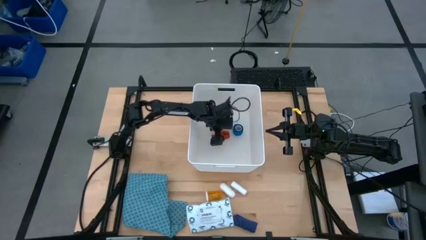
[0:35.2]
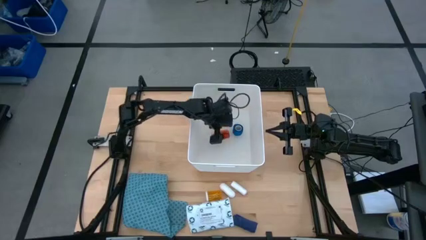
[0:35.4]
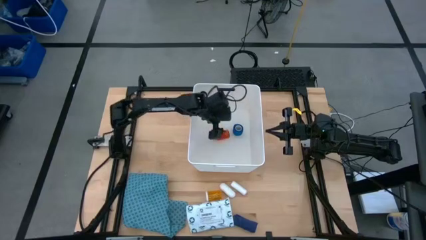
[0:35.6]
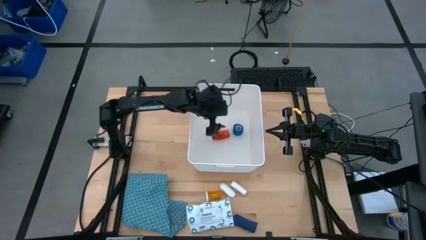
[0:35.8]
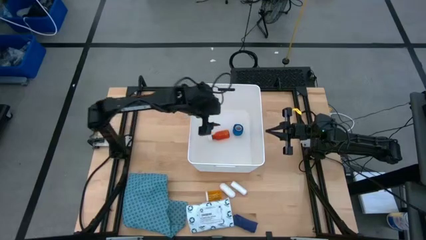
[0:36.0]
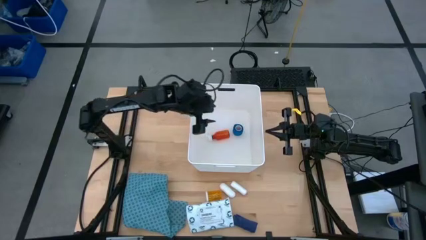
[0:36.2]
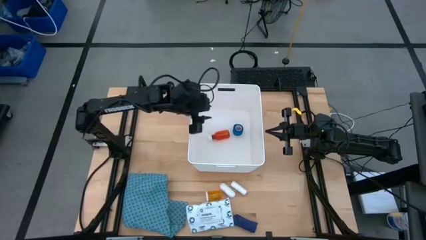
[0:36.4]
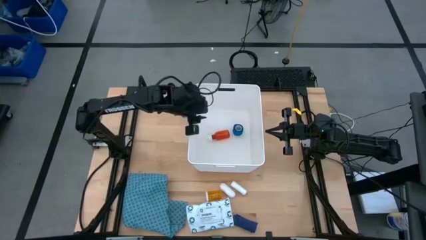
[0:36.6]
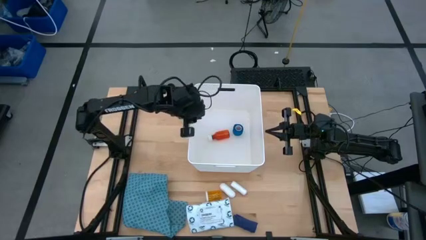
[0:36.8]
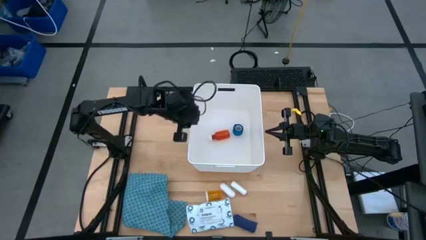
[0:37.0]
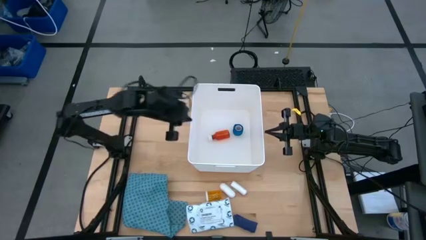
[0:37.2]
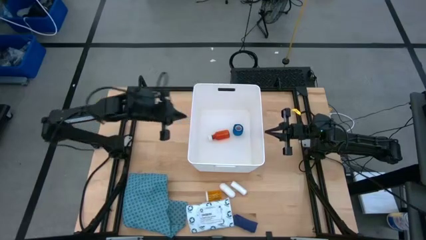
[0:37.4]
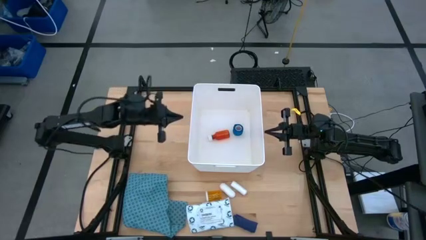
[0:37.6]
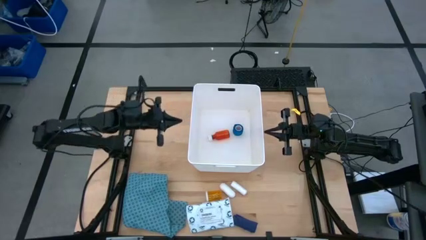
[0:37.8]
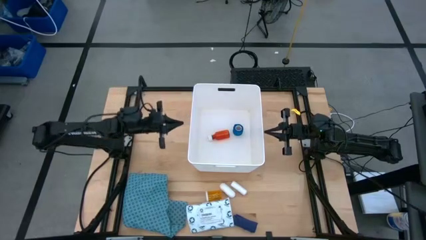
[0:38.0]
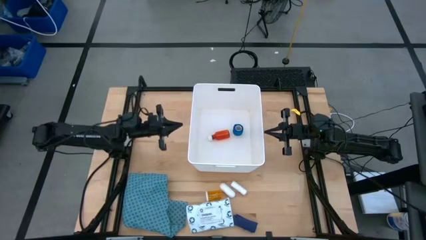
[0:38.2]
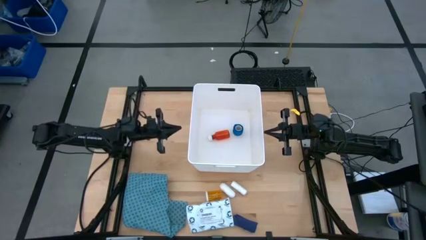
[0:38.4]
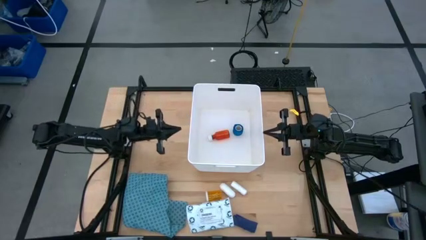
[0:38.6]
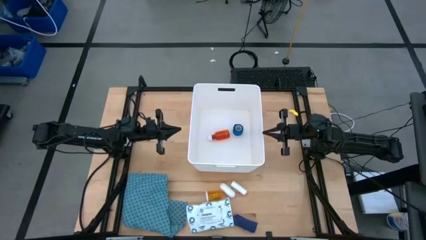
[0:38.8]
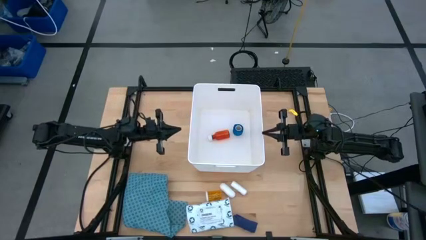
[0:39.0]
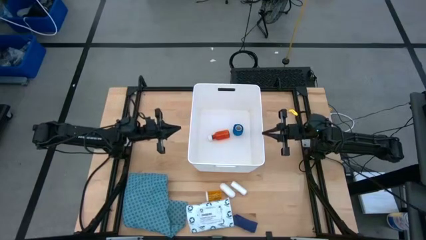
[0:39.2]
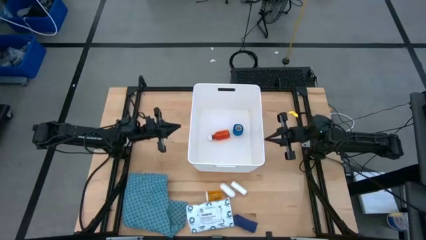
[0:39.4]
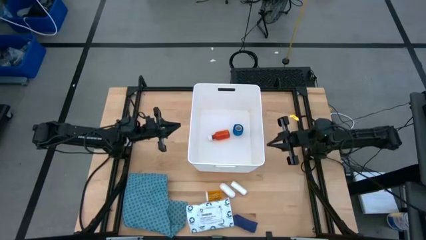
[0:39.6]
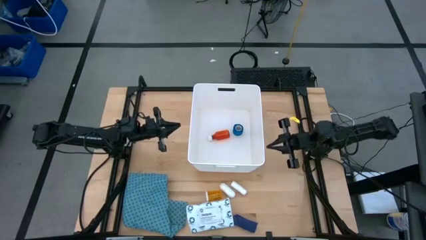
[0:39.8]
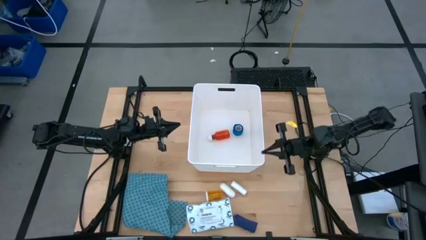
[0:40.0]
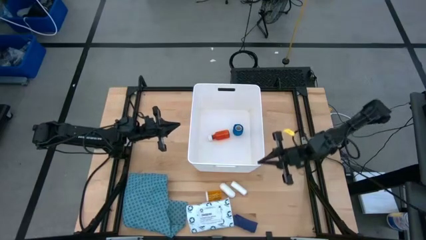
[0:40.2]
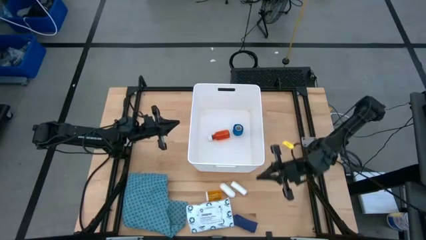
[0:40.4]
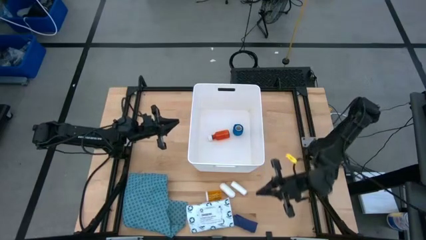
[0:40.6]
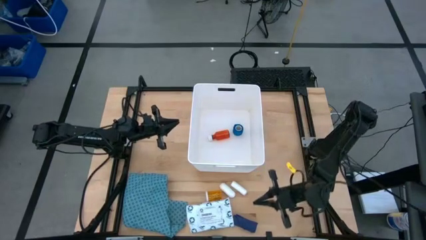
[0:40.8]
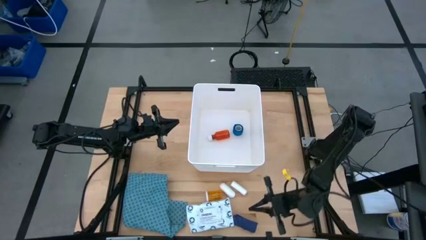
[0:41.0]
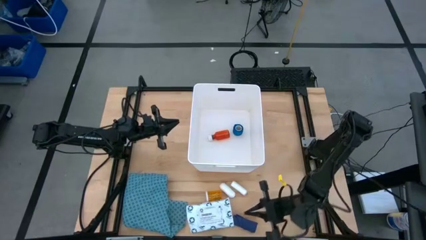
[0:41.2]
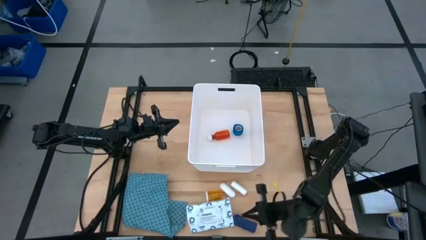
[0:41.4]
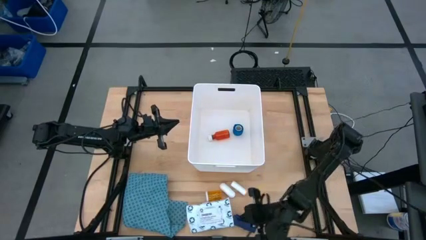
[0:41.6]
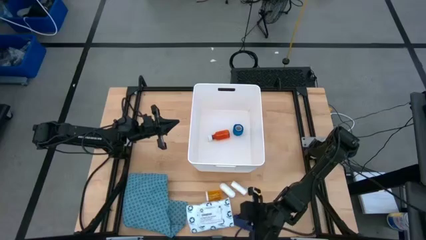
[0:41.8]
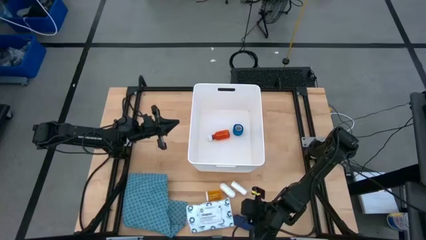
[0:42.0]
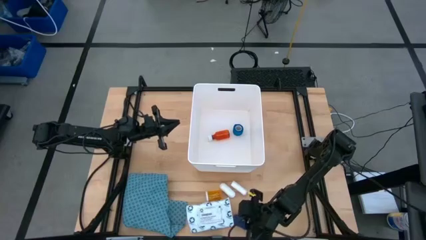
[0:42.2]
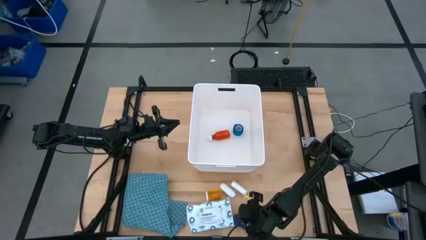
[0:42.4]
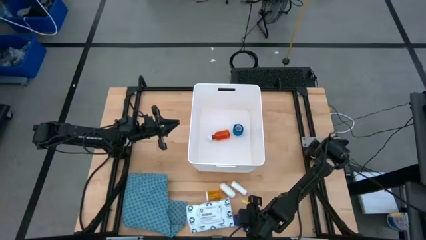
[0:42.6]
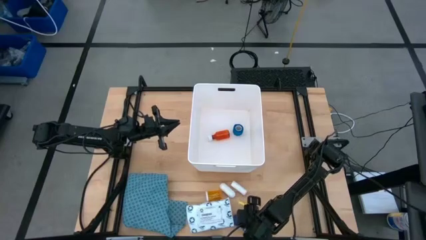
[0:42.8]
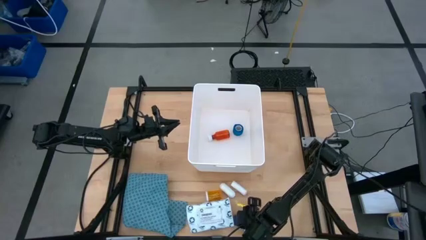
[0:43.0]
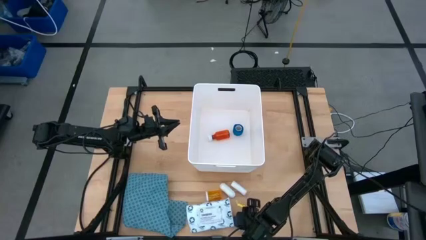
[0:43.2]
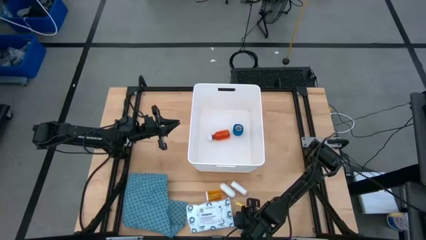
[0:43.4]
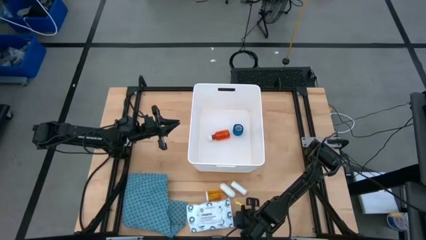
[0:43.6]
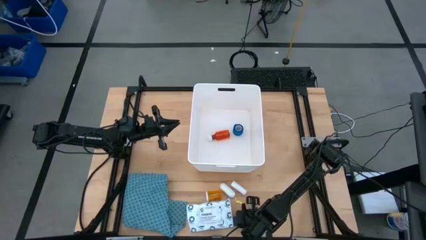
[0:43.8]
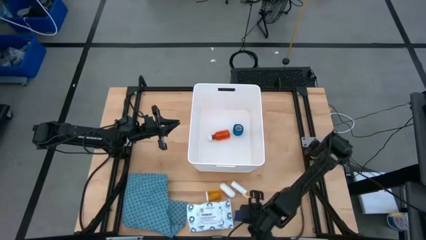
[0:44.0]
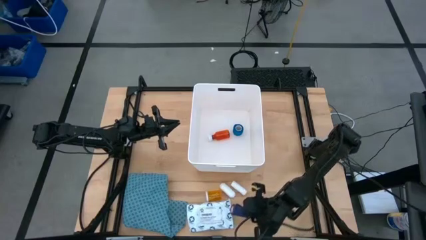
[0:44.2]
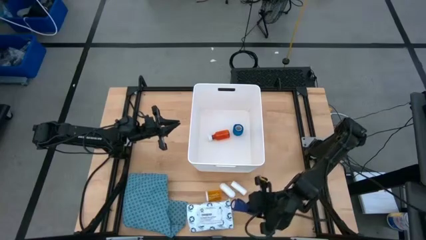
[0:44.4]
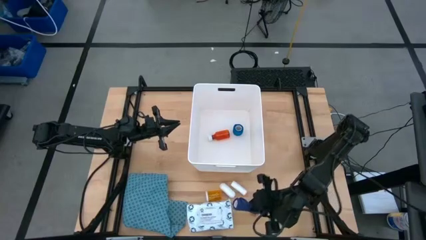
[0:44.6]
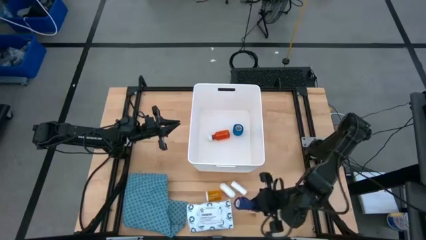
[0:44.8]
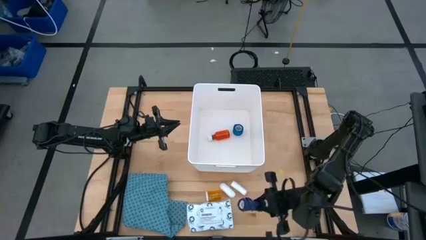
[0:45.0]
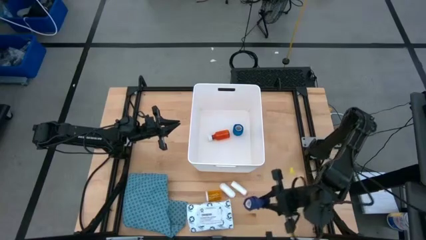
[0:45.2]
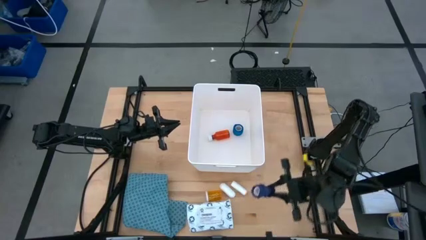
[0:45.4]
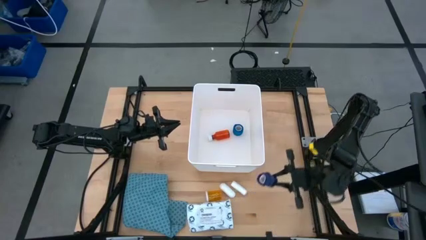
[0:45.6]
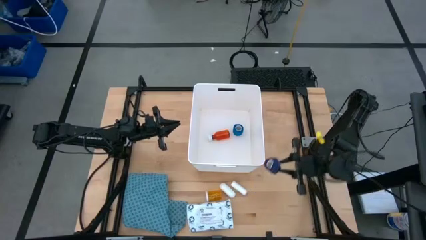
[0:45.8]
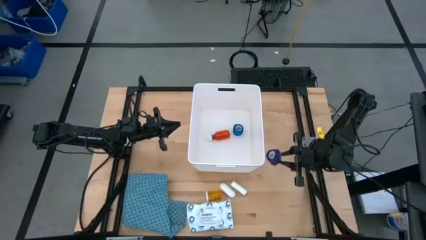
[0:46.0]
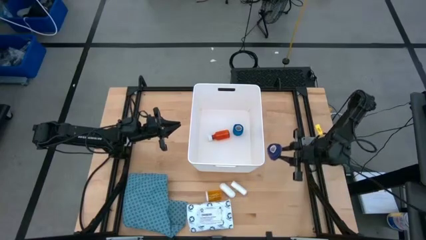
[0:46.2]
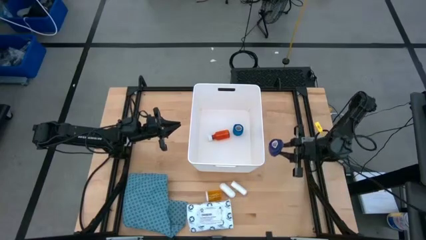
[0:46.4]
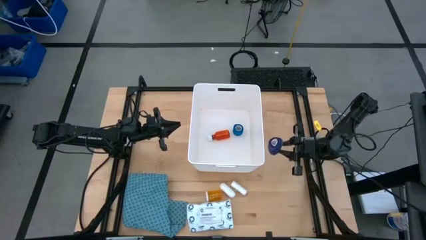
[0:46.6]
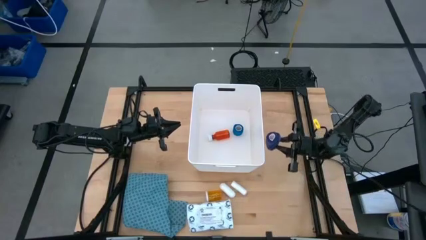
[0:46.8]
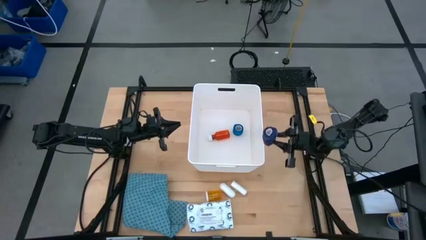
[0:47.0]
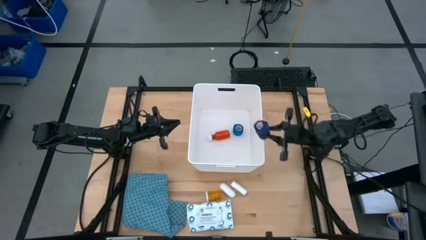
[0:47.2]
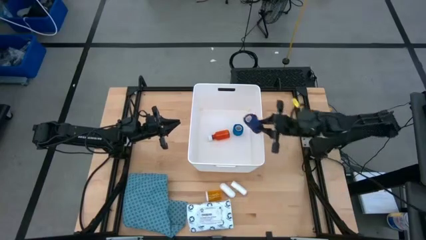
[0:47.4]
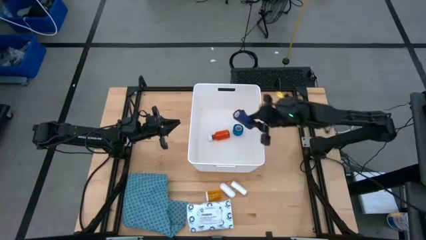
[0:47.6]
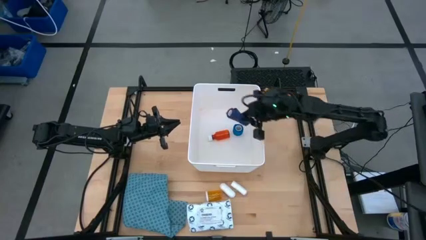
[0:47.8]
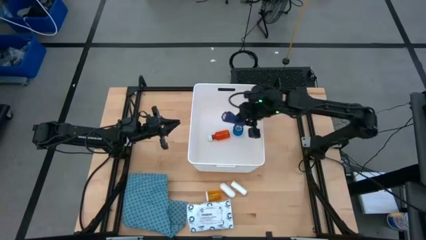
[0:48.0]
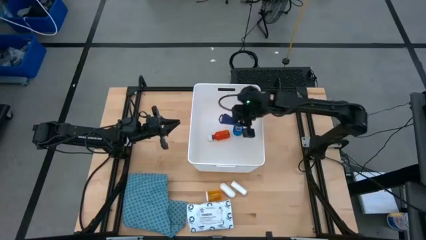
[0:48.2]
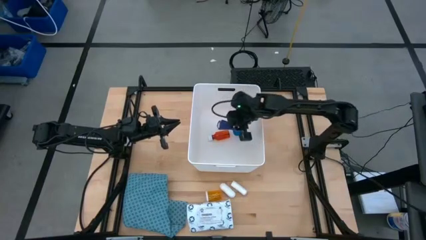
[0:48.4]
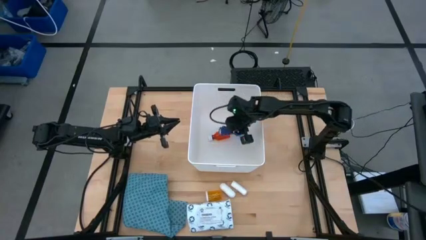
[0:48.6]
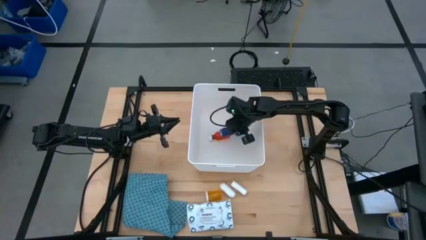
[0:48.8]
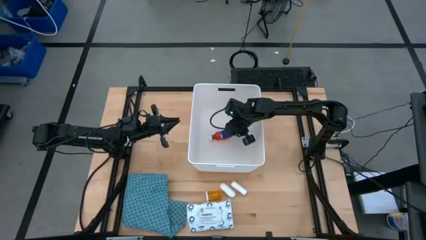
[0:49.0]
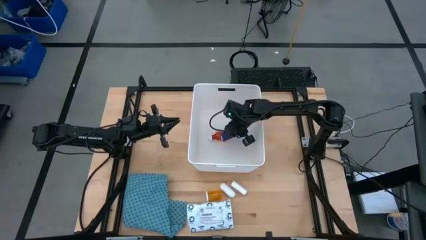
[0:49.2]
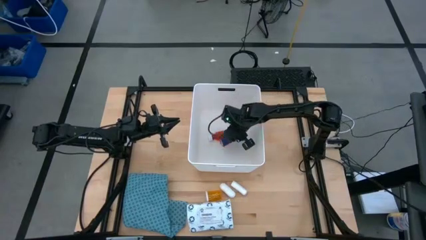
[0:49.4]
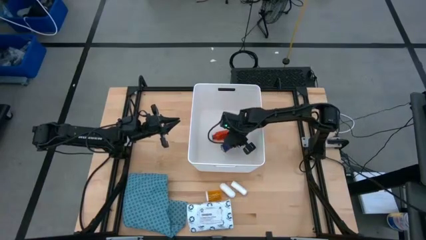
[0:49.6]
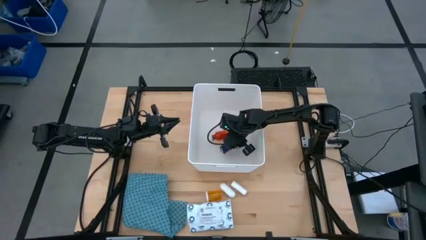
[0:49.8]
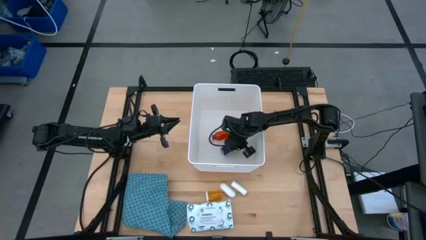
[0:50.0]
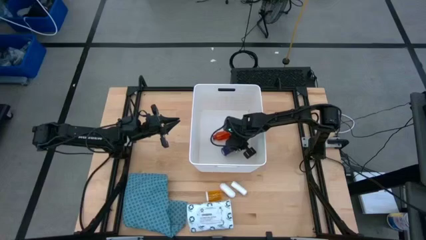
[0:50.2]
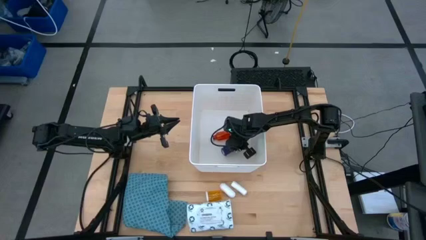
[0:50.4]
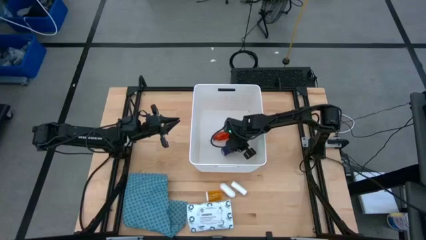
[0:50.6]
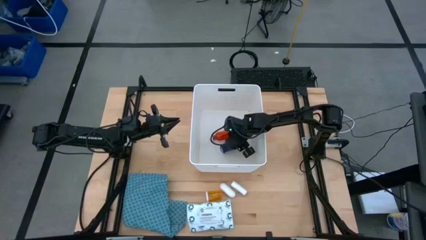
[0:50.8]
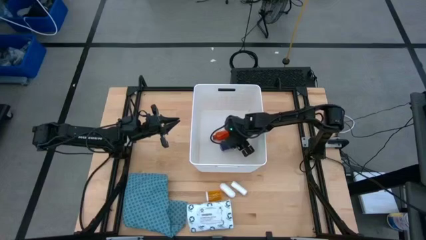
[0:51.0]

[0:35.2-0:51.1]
Task: Pick & place medical supplies in basket/bin
Put the large blue bandage into the white bin
